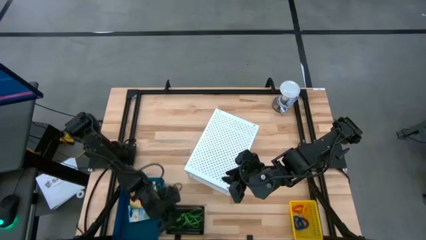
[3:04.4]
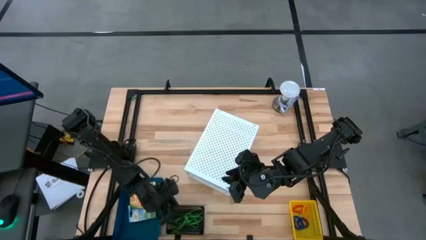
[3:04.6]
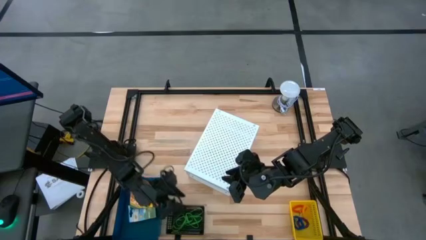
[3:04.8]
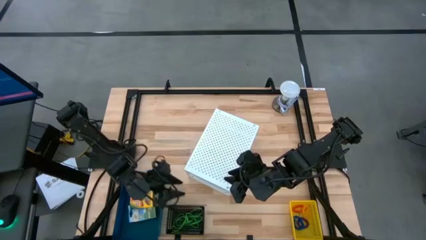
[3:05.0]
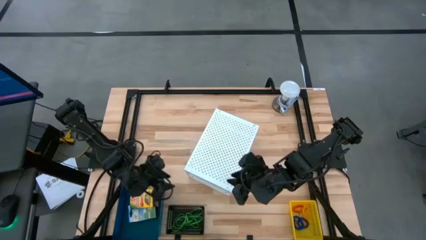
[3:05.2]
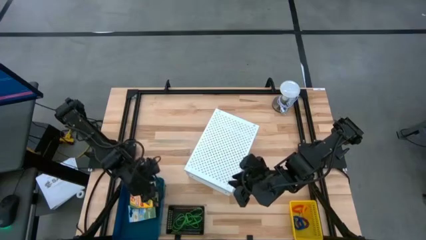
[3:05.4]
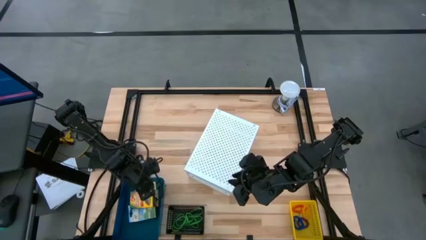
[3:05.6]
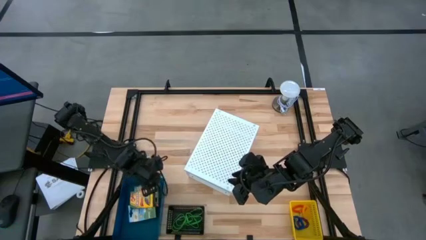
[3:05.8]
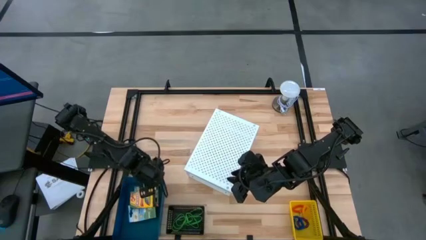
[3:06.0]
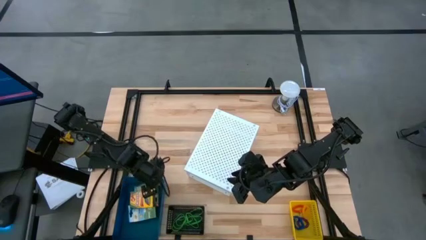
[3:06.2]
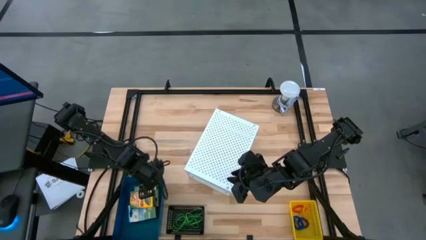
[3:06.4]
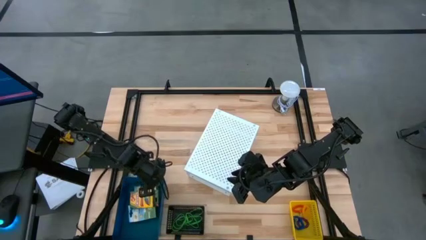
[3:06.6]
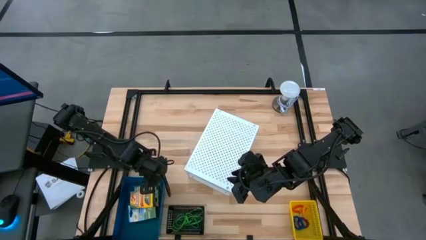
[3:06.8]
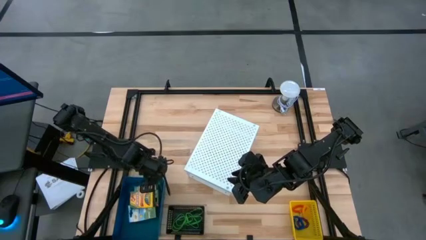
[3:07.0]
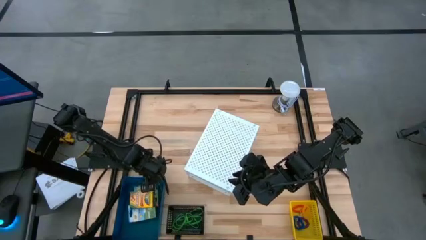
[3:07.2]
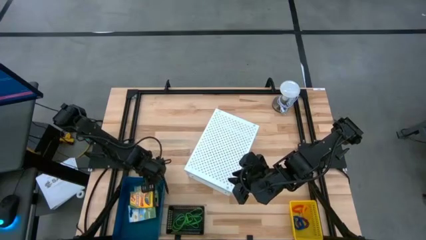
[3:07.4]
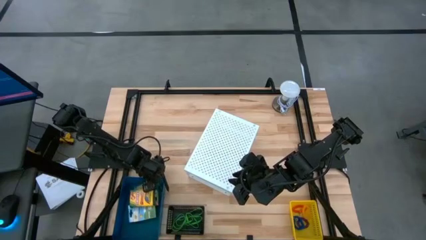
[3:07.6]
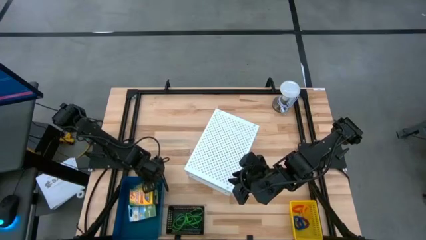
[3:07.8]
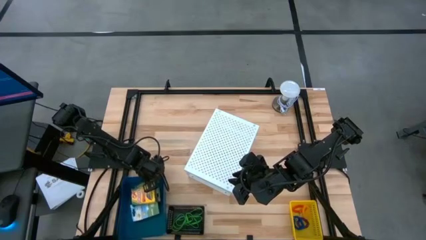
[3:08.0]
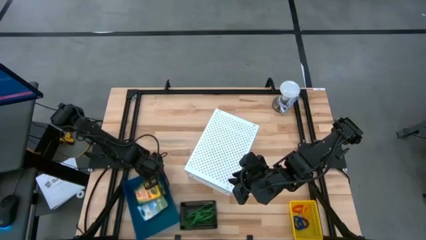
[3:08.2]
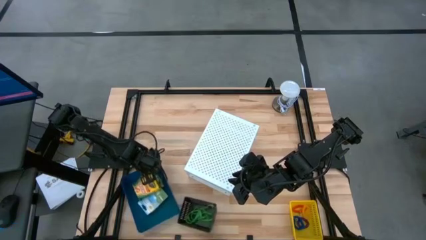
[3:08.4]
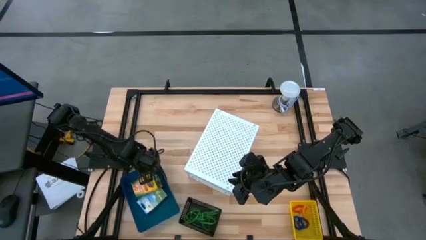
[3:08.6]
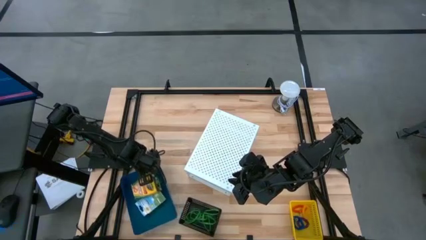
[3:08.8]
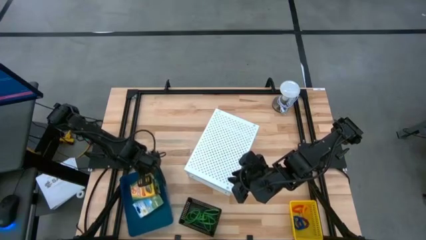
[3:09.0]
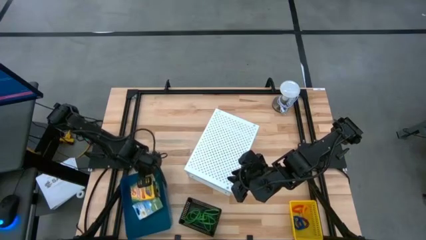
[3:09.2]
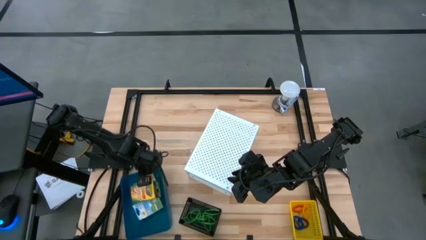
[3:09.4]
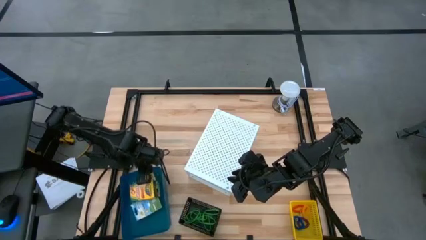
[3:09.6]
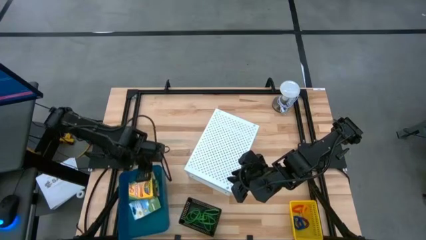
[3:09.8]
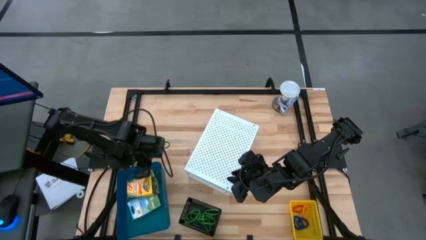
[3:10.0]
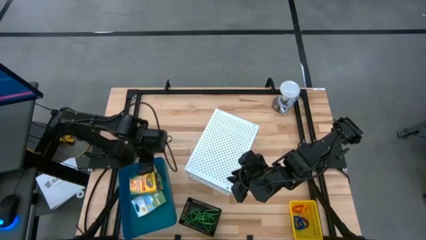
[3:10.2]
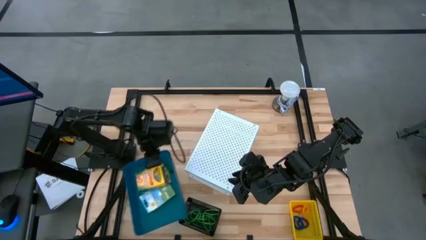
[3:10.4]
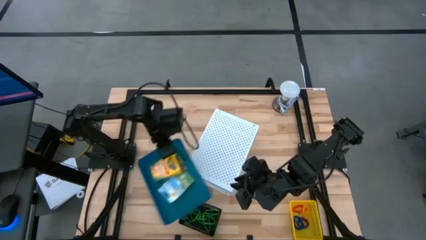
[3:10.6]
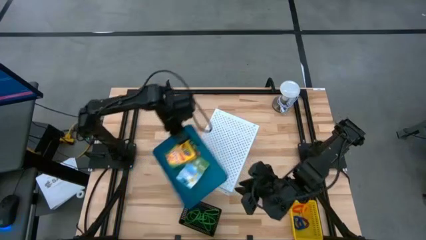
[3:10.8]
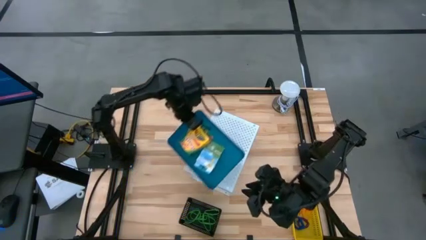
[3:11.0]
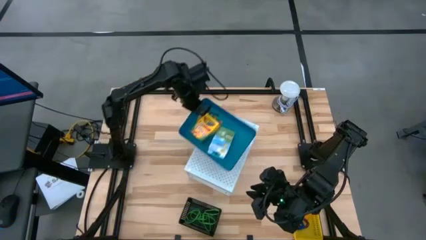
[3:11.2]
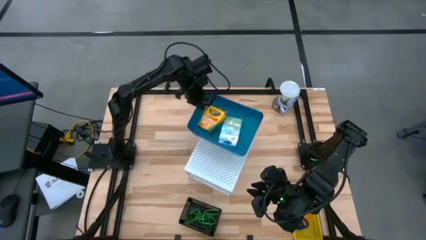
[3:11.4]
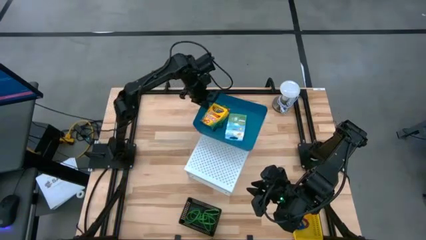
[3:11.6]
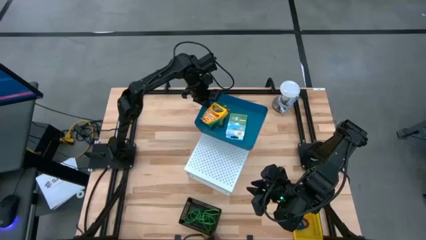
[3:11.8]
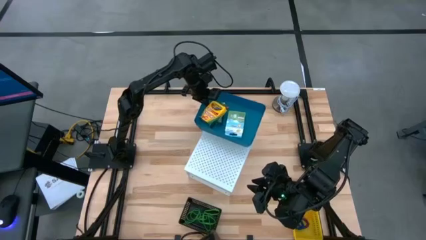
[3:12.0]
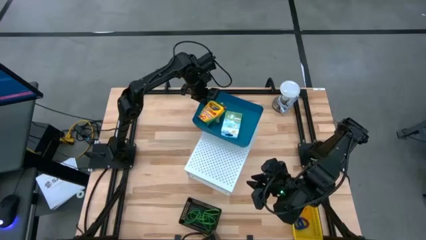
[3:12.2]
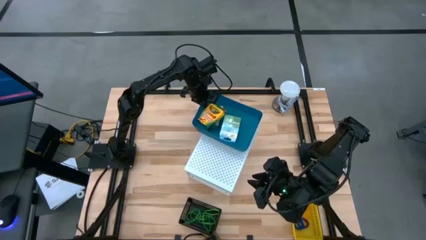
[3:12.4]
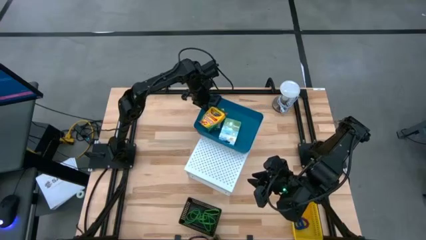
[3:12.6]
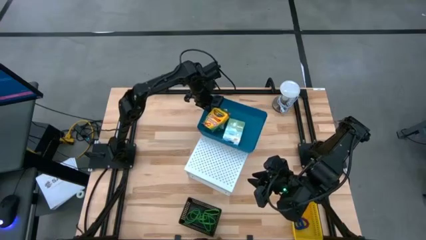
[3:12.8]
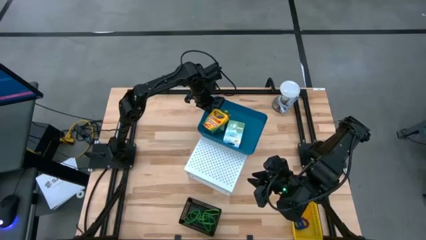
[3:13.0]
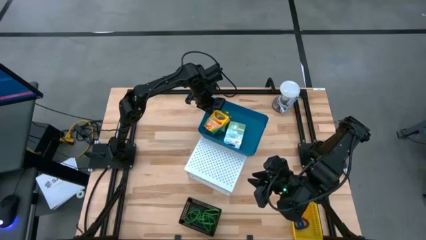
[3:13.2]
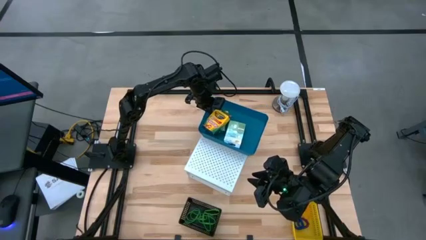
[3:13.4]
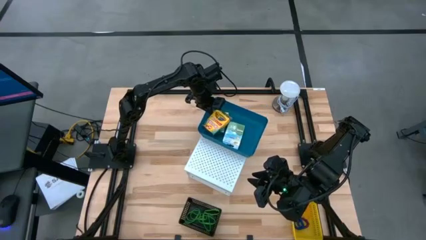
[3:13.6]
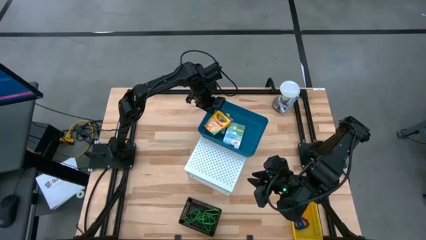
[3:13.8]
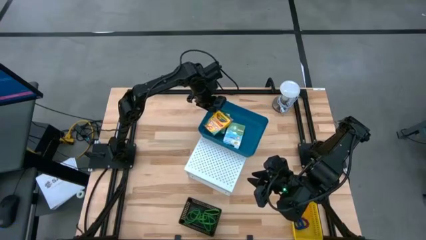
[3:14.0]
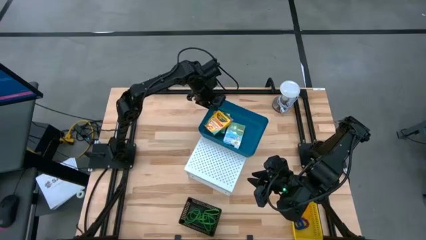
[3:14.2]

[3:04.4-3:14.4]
Task: Pick & Place Office Desk Supplies
Put the blue bin on the shelf

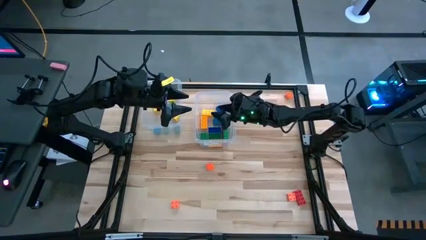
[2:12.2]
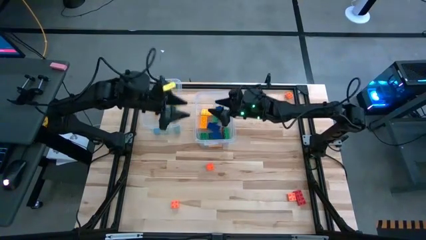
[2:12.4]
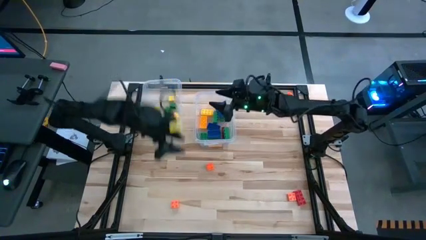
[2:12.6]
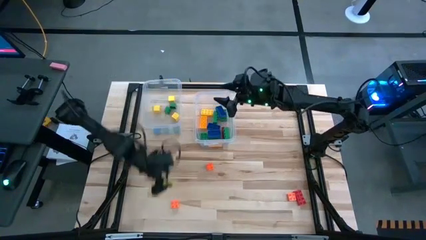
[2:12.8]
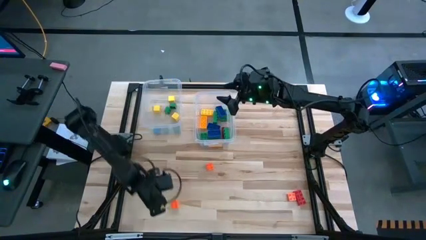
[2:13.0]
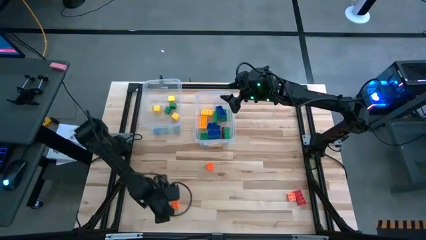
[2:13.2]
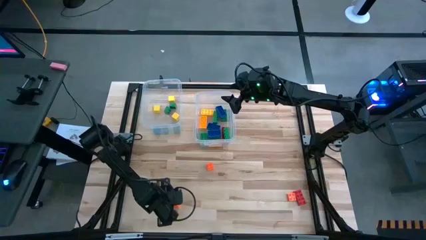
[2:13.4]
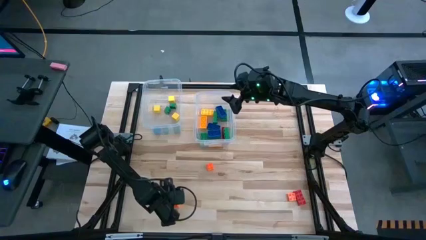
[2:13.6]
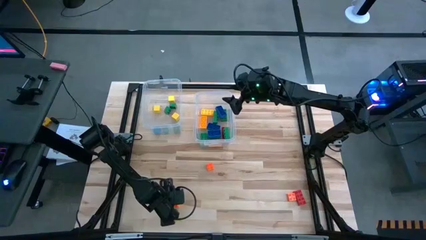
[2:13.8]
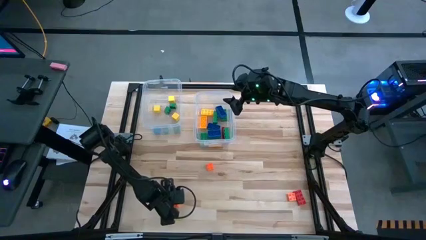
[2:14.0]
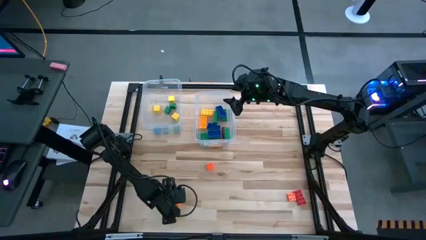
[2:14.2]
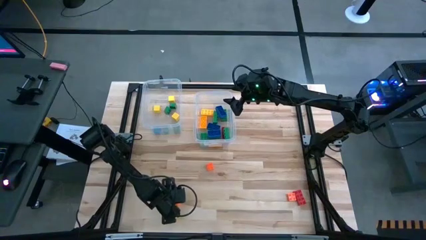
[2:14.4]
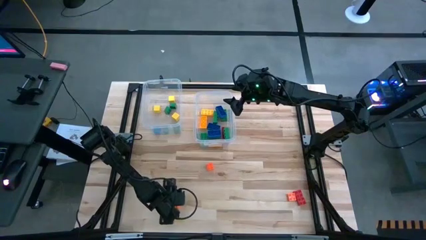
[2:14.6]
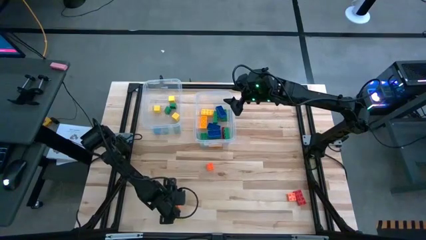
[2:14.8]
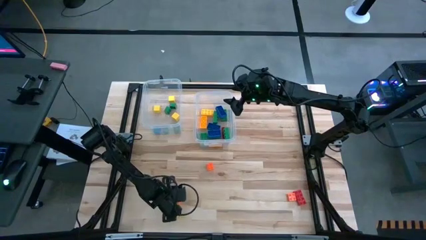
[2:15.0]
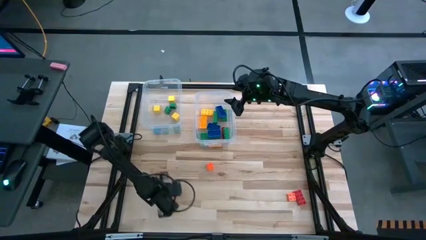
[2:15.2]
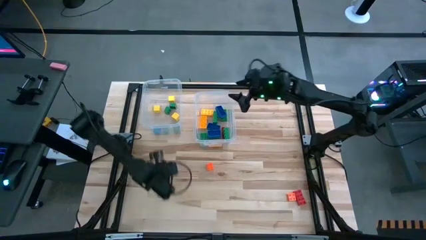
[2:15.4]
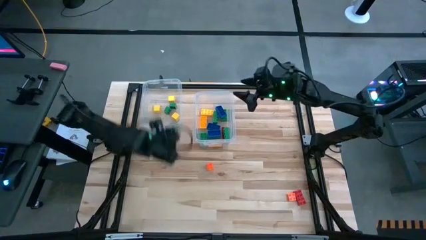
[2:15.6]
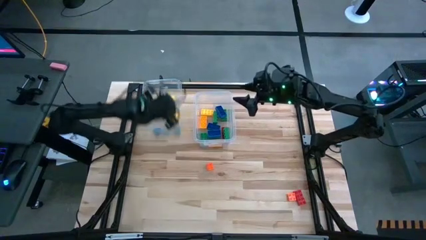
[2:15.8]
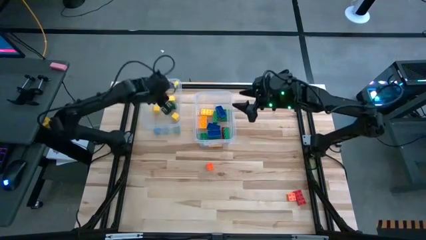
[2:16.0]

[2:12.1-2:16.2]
Task: Sort blocks by size
Put the orange small game piece into the left transparent bin

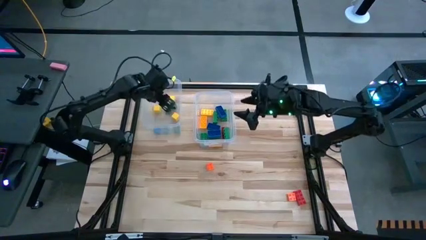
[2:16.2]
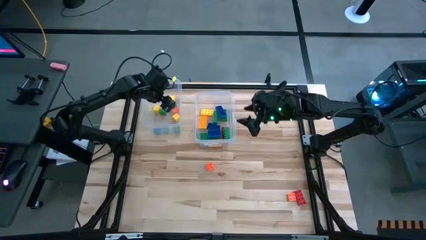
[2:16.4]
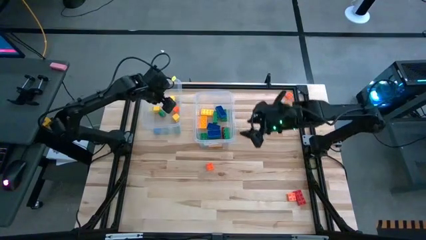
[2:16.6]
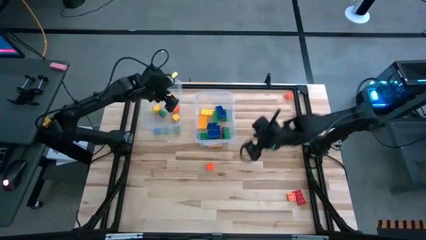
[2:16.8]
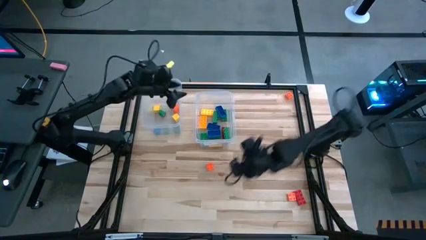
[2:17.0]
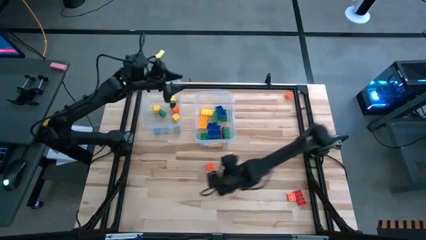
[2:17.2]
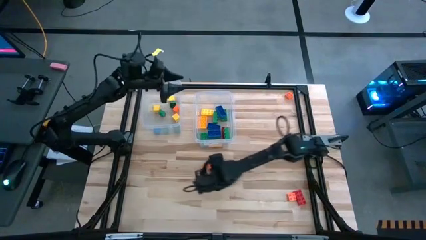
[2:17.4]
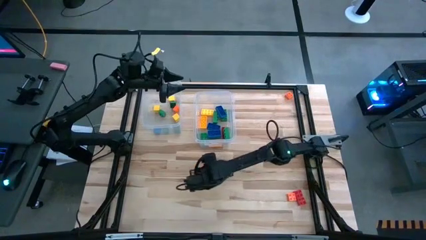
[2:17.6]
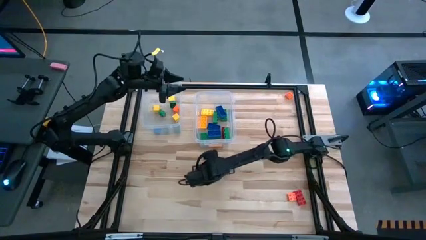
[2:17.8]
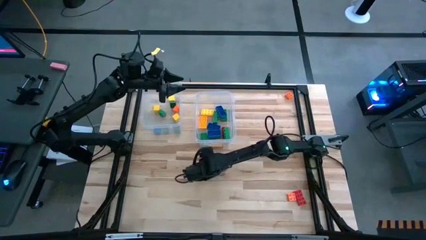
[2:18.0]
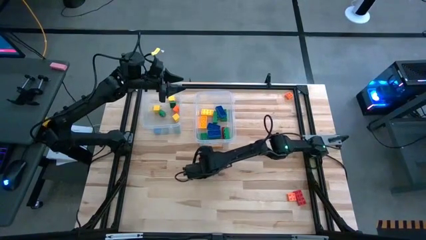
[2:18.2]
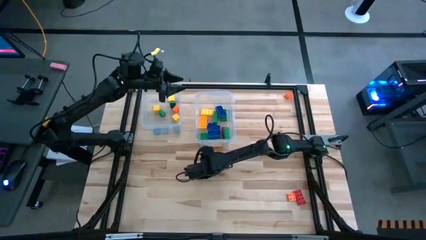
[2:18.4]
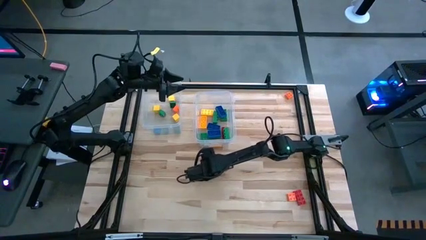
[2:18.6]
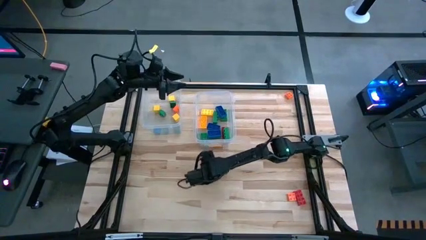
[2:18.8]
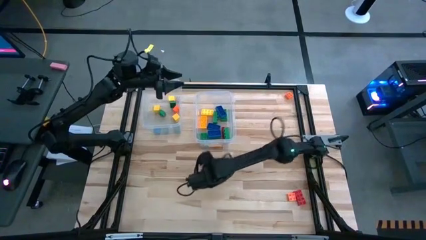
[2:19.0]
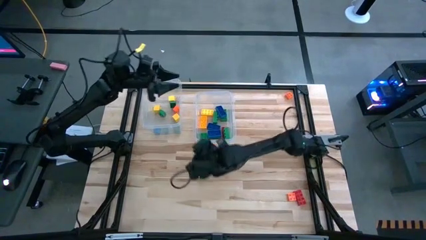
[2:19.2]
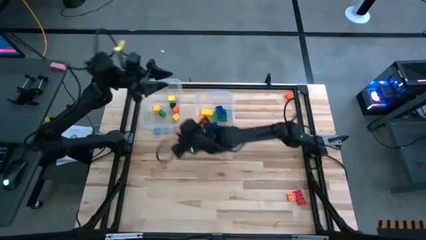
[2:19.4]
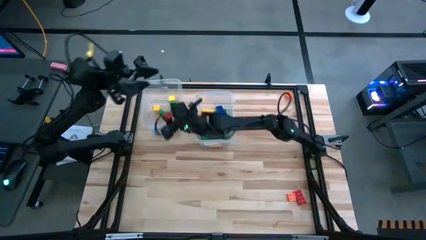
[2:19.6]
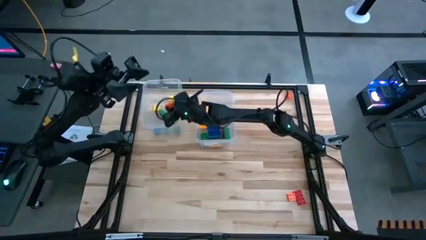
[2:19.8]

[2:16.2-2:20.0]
Put the orange small game piece into the left transparent bin
